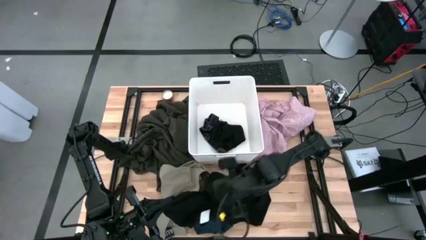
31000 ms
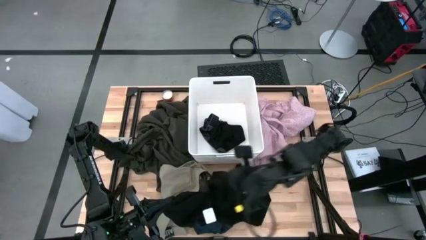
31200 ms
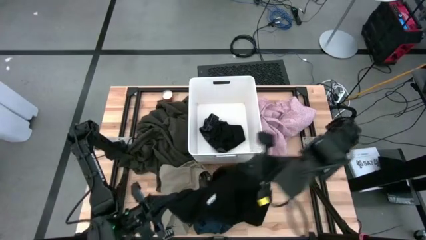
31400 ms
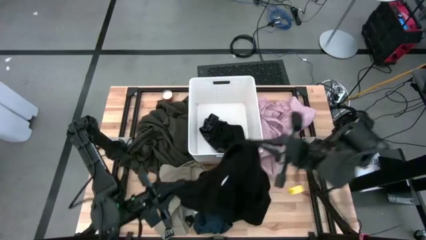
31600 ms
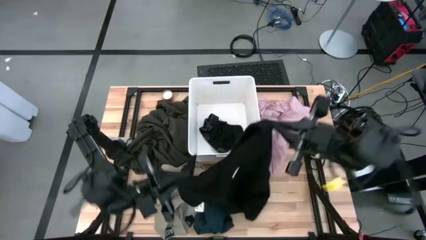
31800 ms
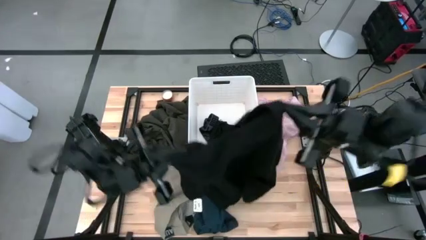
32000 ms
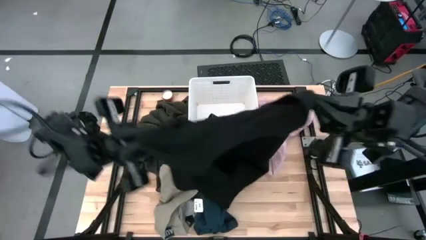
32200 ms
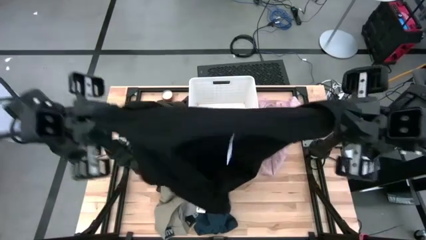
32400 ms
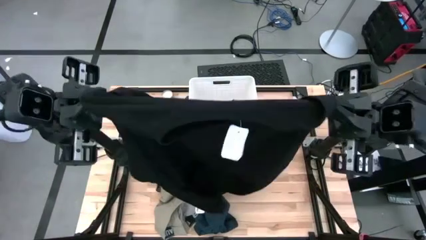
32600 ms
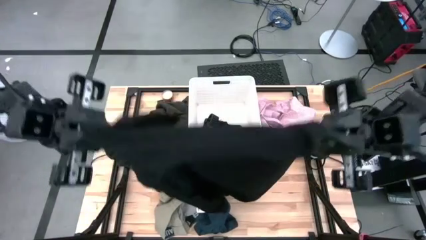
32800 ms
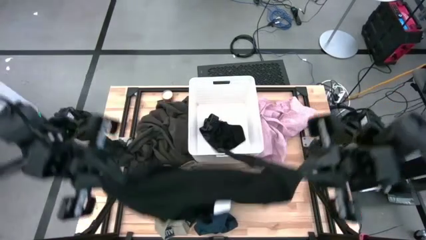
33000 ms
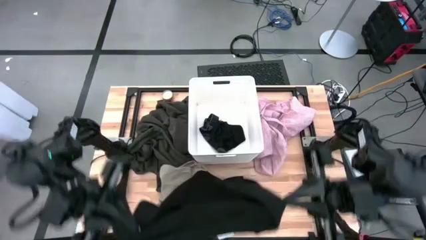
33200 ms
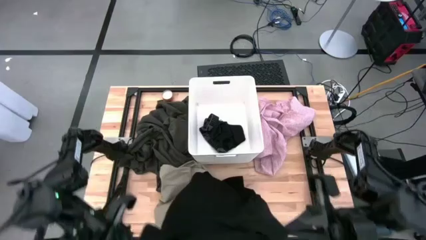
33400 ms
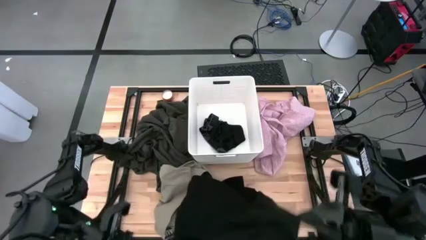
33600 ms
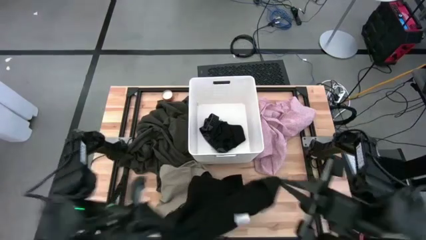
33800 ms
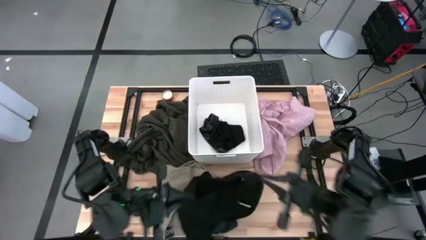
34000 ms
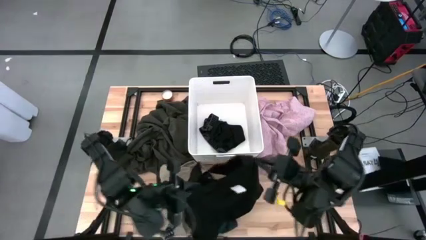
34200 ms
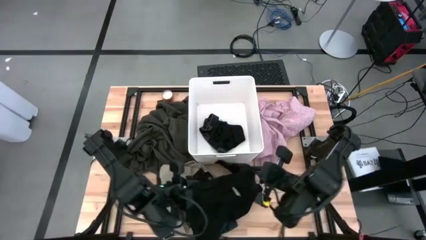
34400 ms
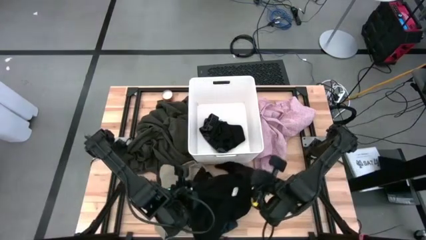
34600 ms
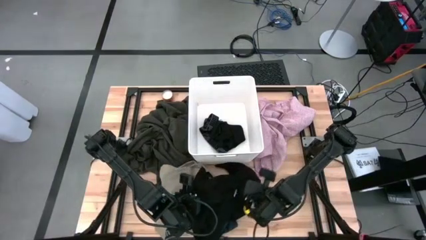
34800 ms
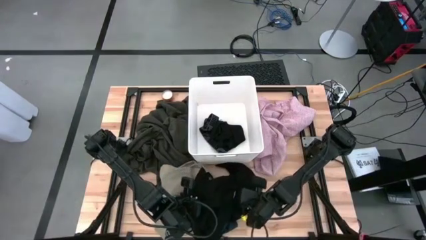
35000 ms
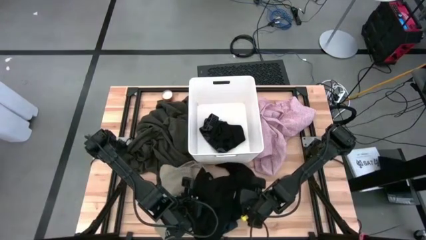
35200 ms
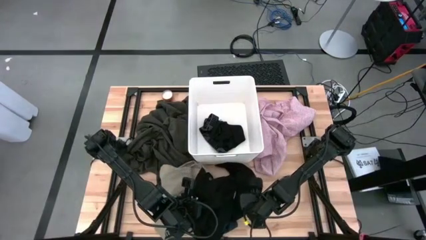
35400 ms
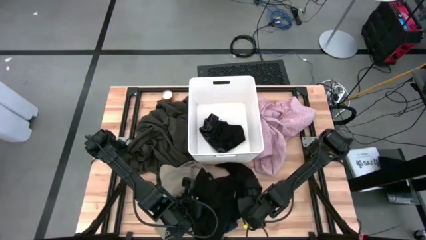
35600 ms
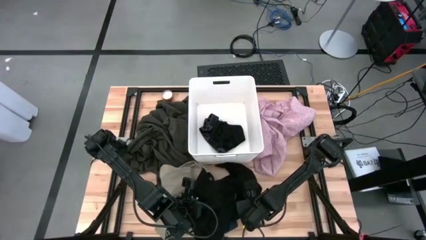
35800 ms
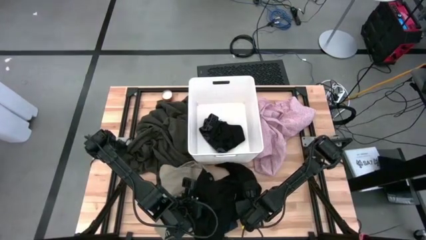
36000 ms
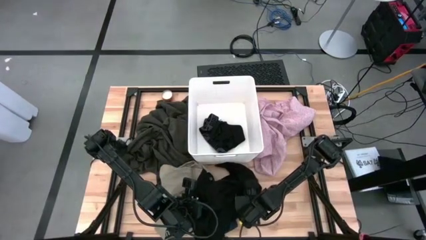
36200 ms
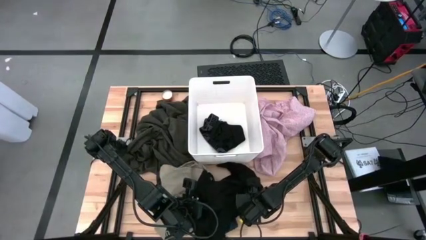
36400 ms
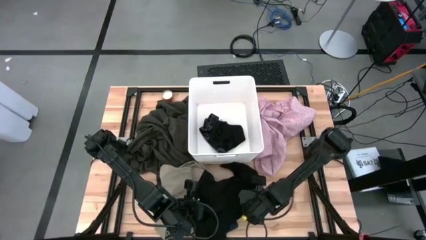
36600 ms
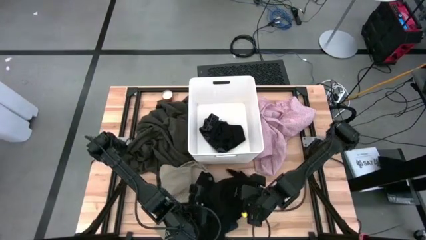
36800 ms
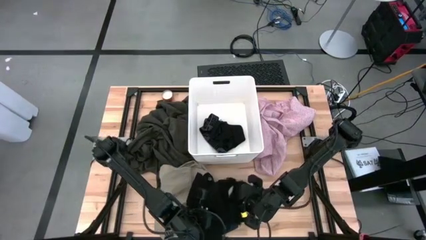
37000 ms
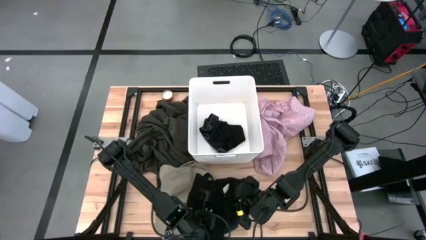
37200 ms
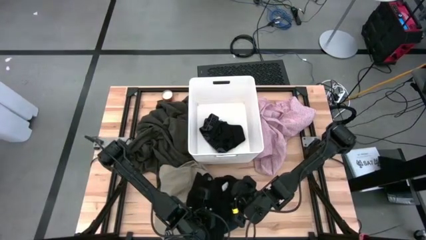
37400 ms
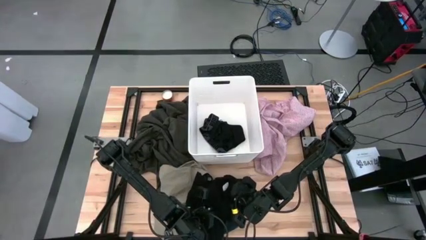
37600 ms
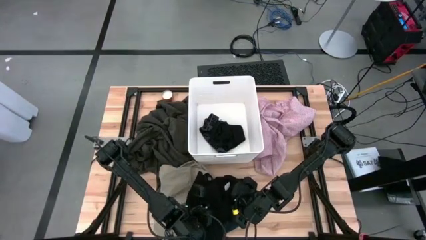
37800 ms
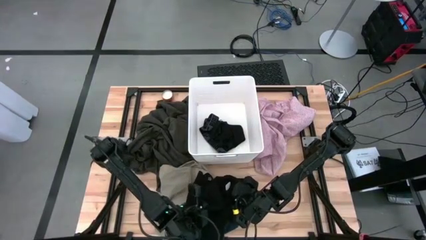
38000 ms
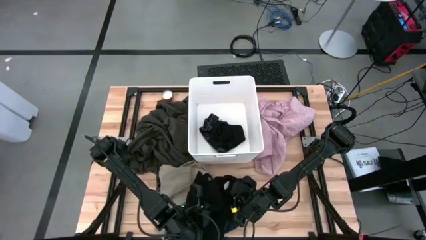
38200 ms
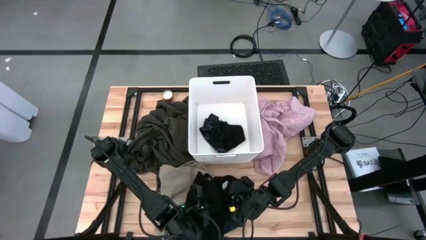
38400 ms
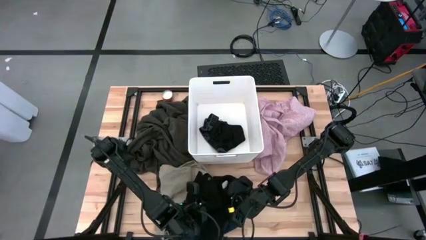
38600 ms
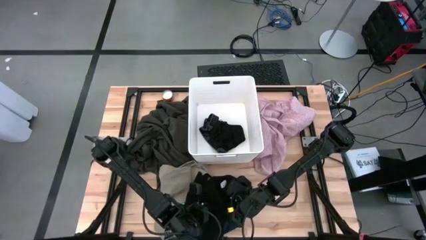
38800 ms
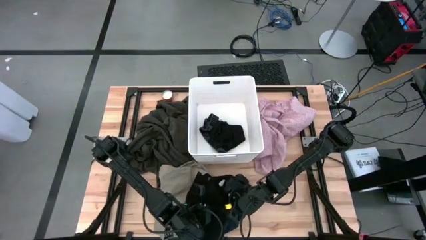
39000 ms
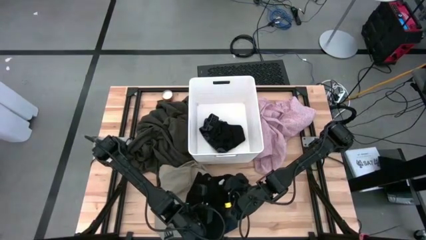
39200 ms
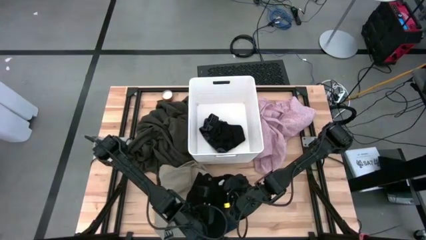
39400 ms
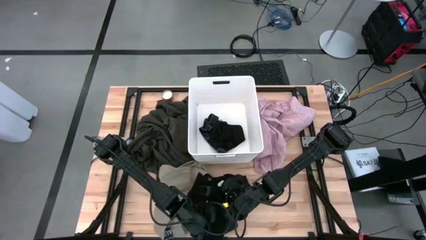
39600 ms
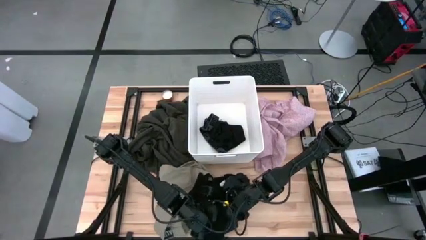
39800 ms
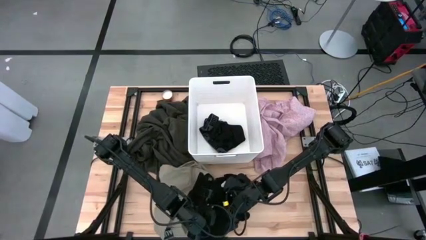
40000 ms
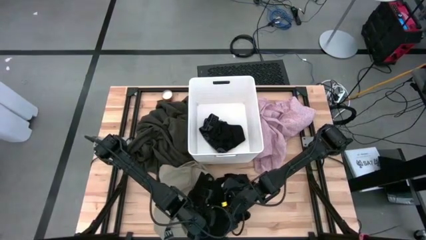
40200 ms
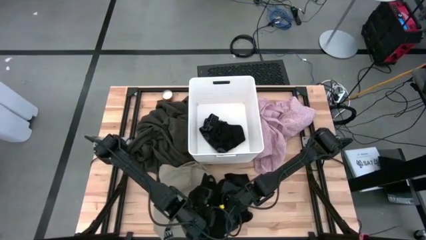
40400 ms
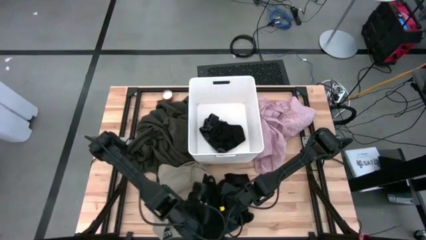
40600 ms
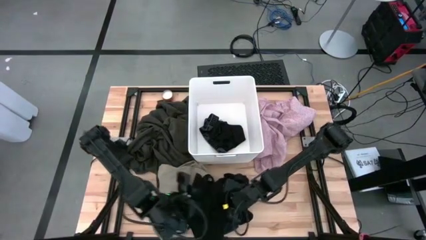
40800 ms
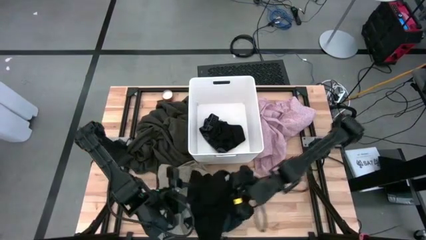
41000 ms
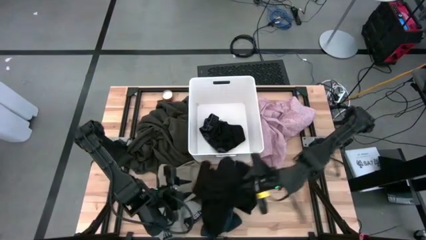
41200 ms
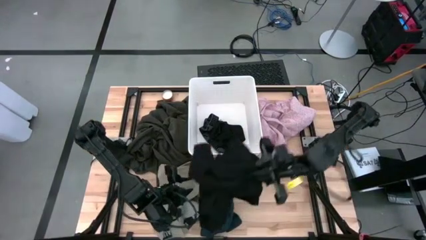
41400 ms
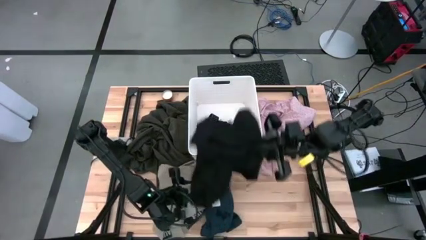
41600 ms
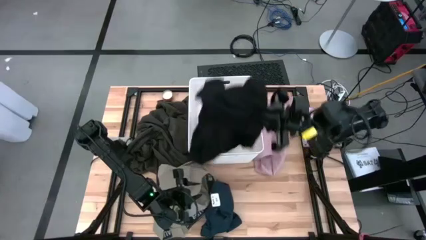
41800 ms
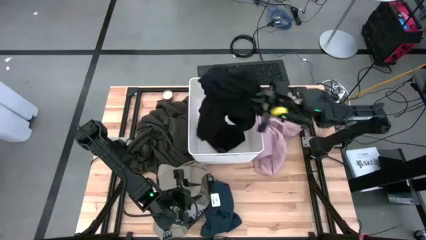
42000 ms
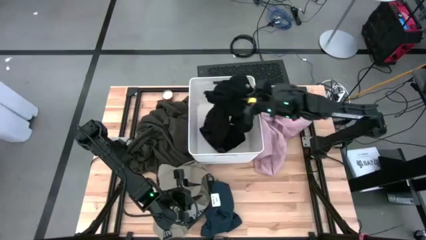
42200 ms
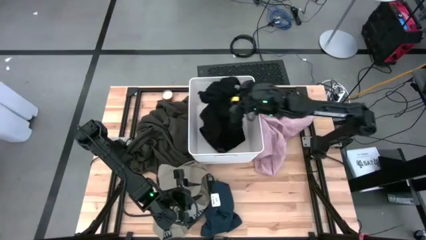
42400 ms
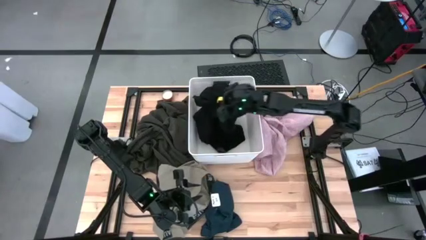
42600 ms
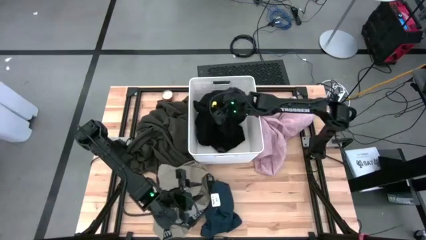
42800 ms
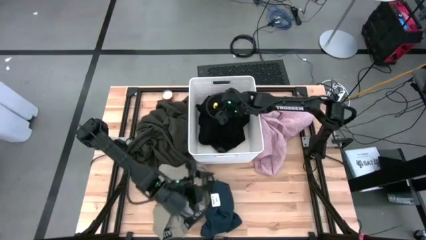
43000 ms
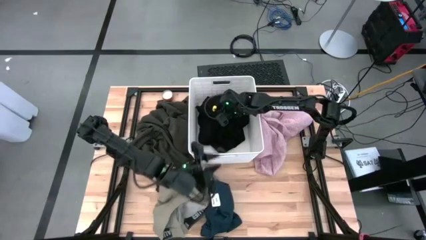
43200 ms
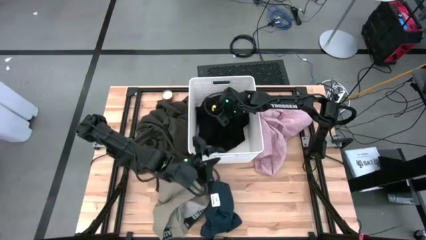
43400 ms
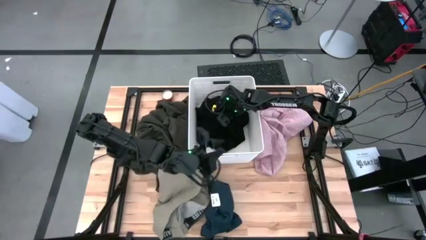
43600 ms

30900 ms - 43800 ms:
Task: Sort clothes
Put the black sweater into the laundry bin

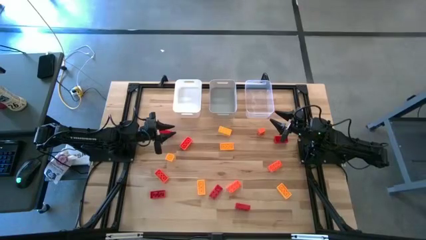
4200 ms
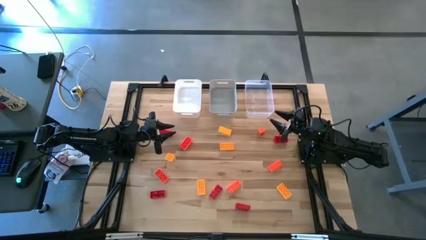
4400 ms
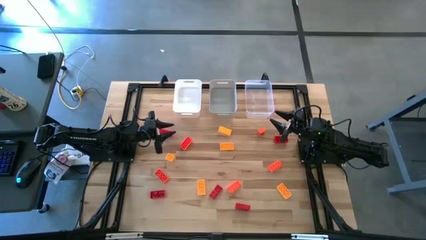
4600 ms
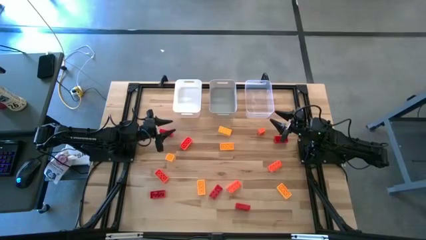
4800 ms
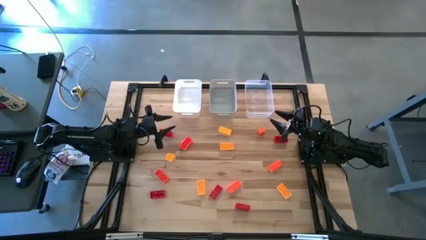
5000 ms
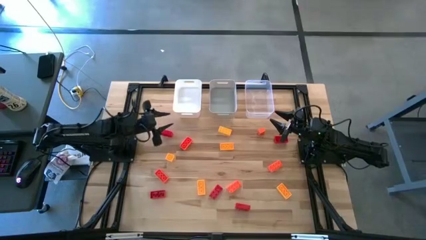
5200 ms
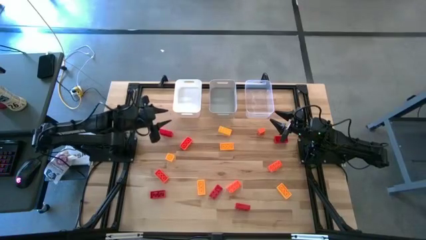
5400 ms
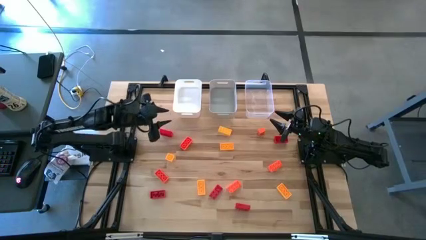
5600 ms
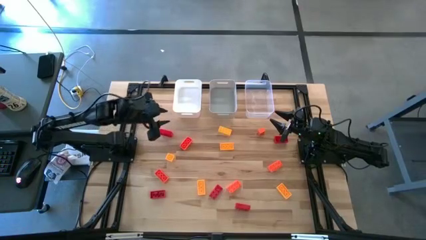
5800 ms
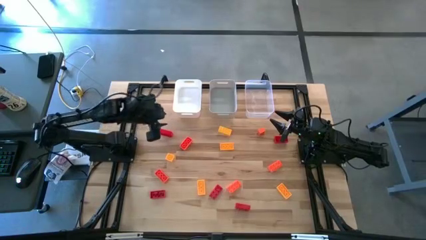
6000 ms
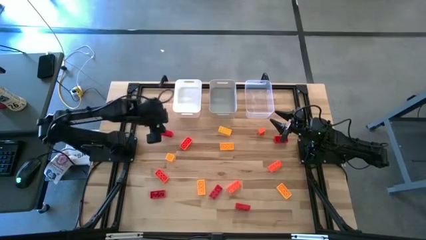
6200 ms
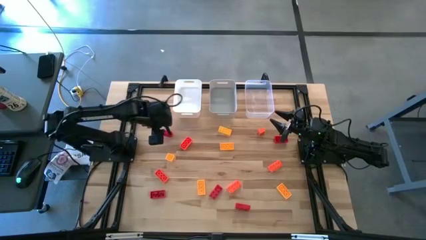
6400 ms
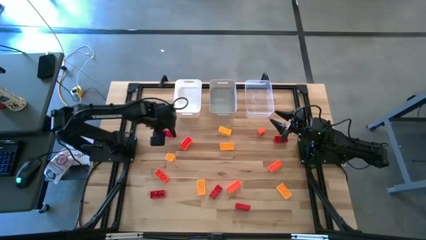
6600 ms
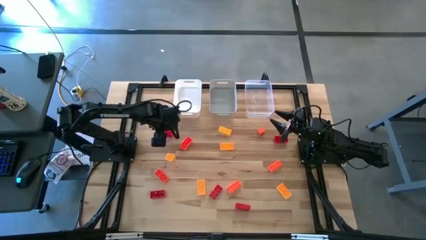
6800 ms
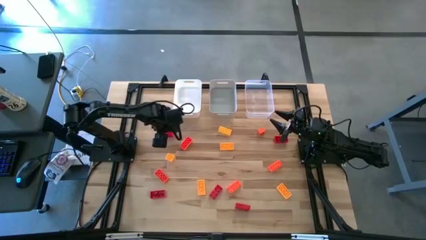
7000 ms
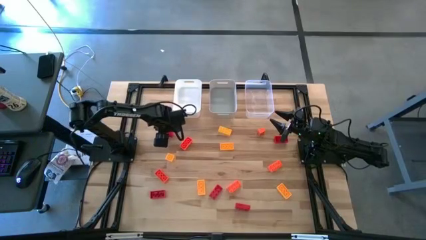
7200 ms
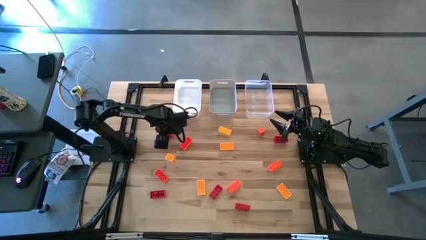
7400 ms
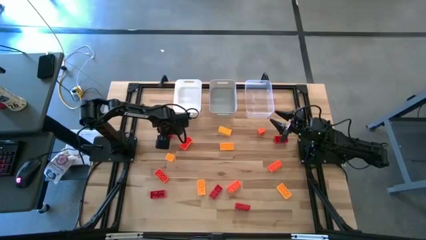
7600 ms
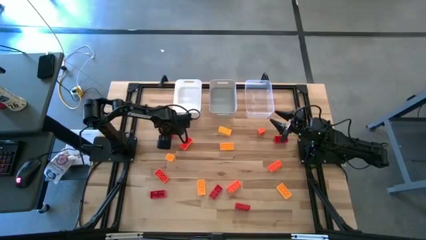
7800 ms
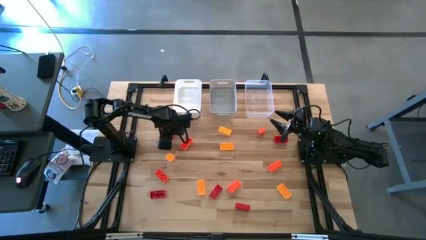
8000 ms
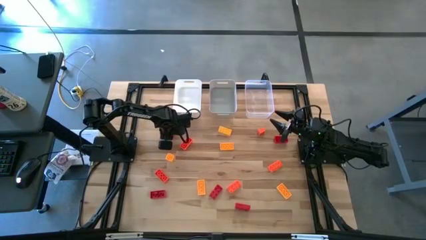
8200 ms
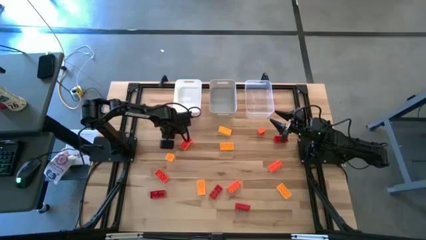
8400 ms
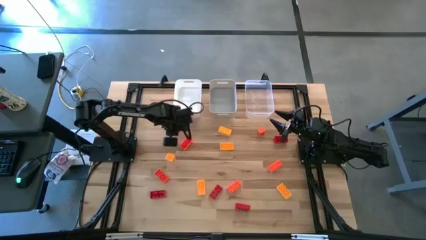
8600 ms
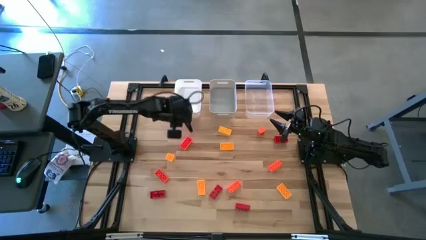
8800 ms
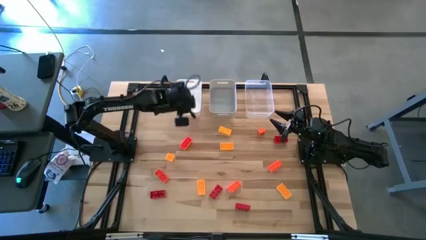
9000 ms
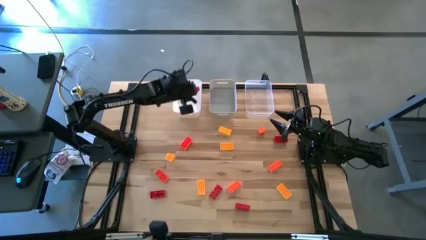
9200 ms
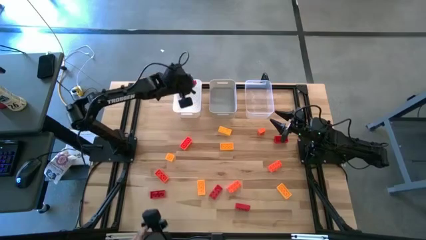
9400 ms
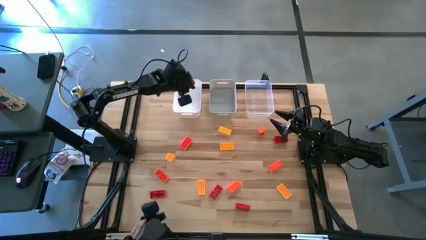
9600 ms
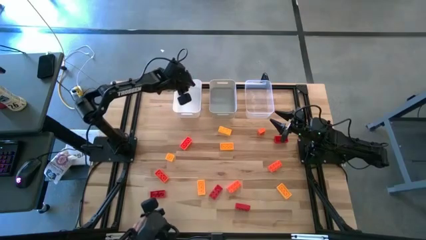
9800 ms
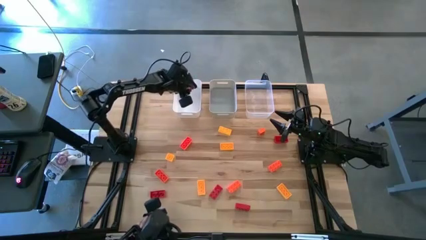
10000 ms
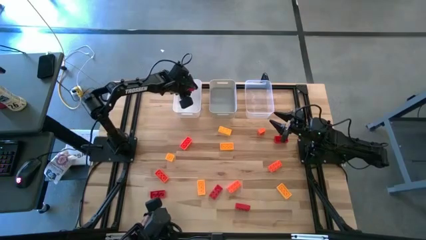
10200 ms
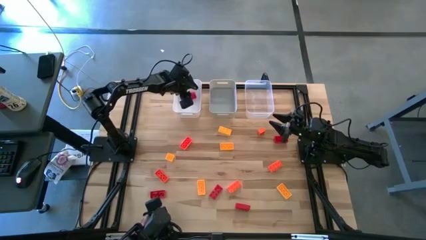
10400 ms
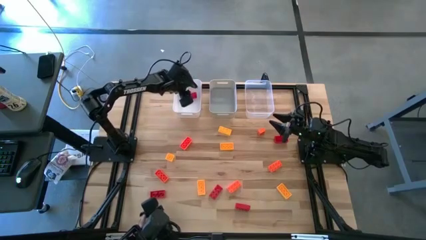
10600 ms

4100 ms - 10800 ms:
Task: Sort & place blocks by color
Put the red game piece into the white bin
